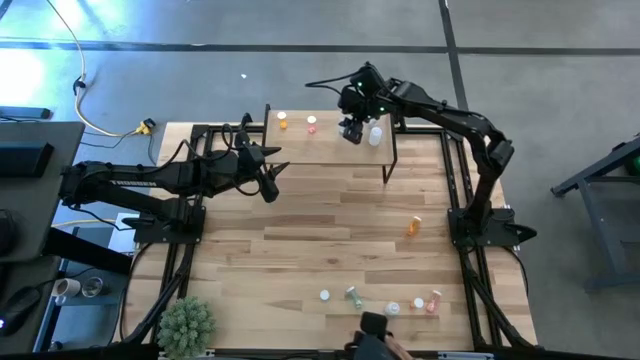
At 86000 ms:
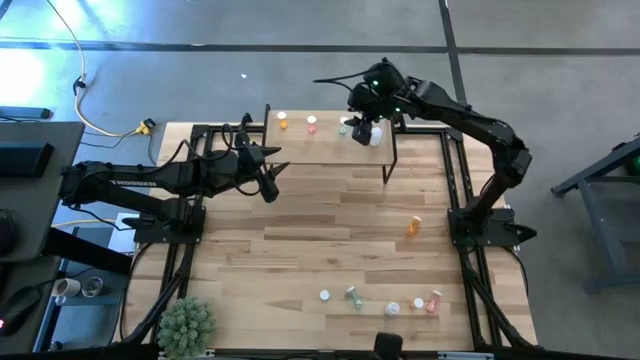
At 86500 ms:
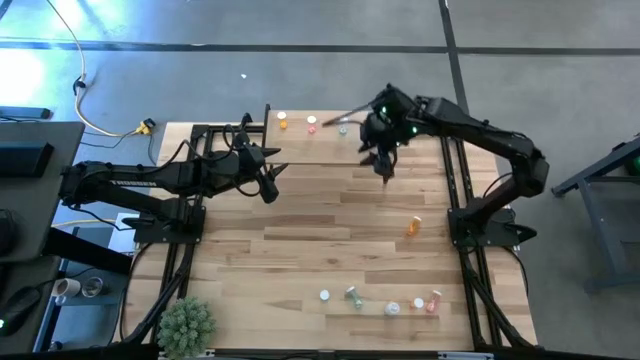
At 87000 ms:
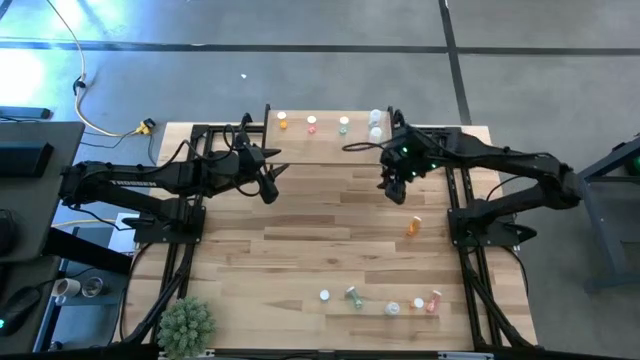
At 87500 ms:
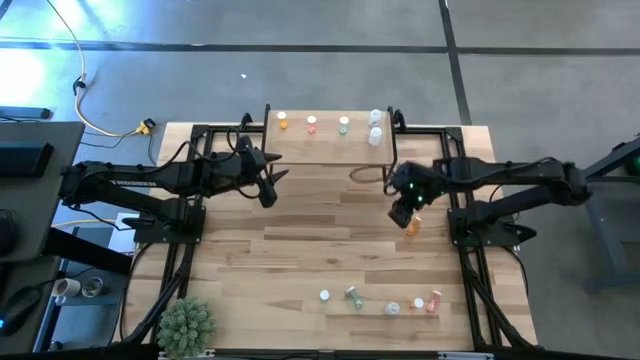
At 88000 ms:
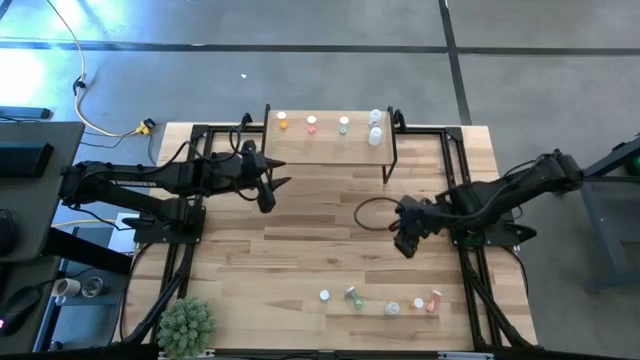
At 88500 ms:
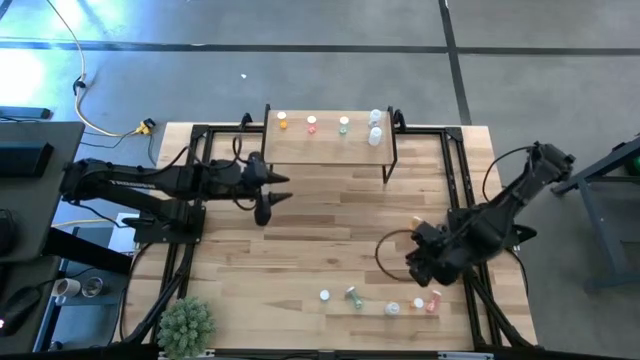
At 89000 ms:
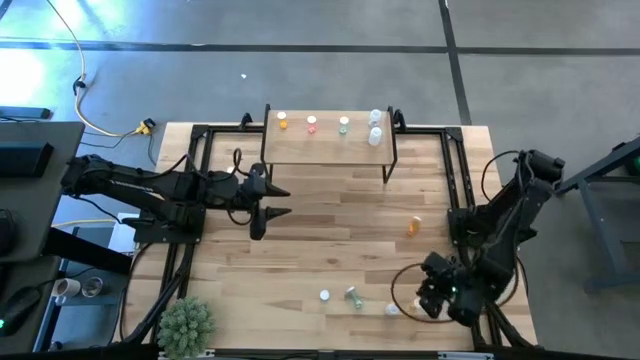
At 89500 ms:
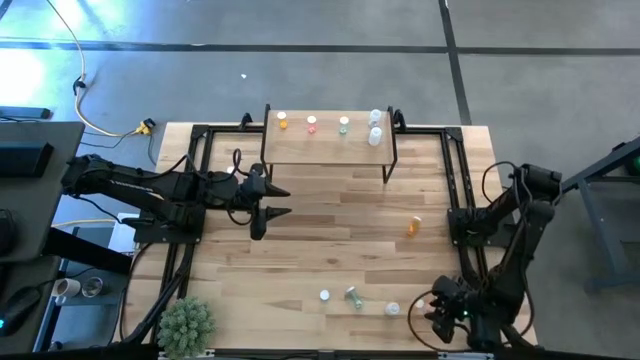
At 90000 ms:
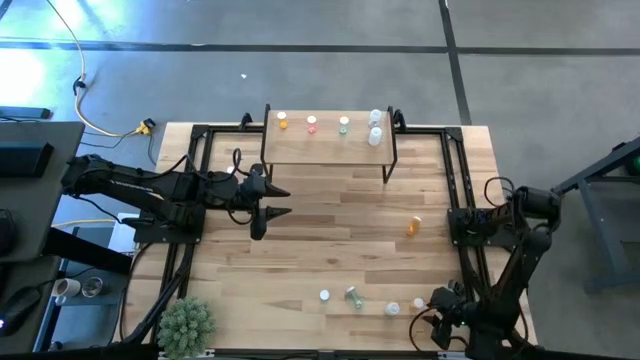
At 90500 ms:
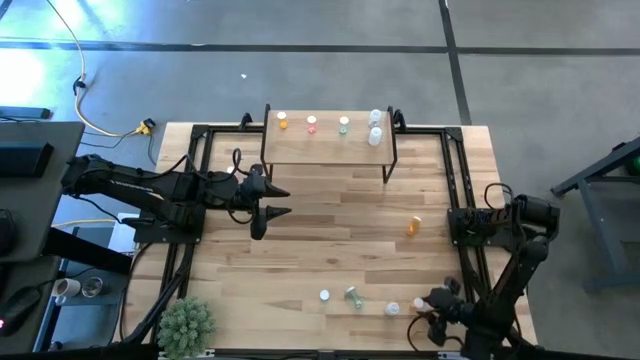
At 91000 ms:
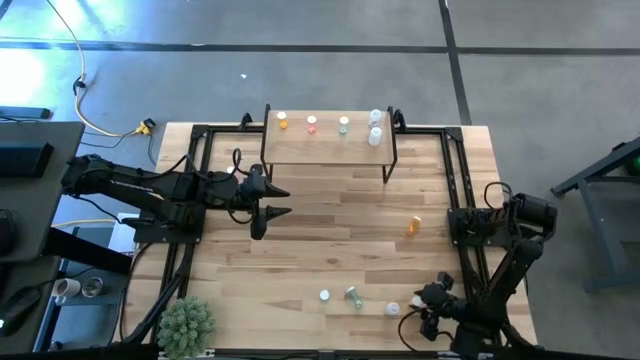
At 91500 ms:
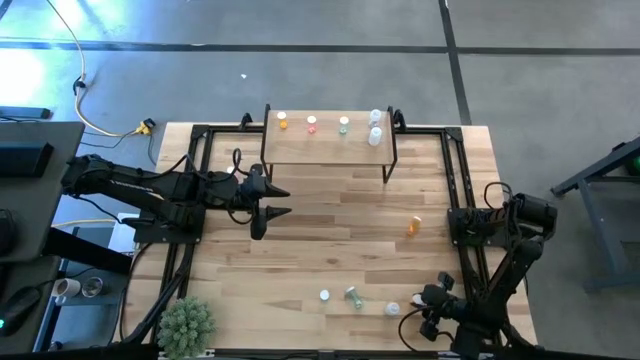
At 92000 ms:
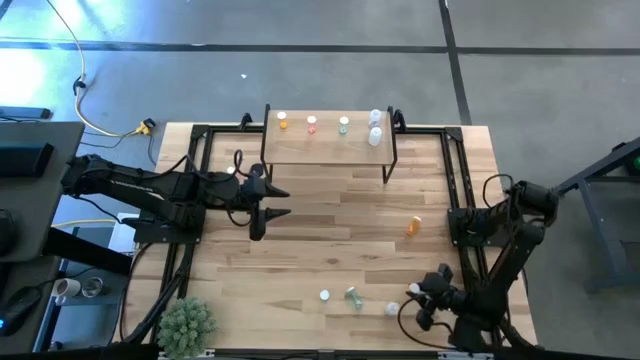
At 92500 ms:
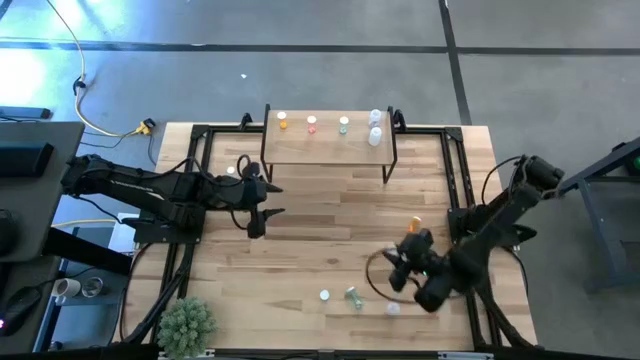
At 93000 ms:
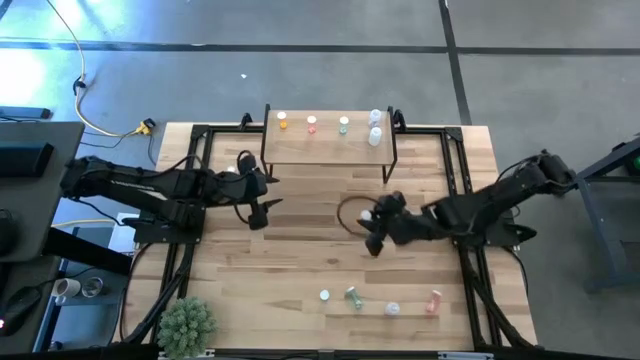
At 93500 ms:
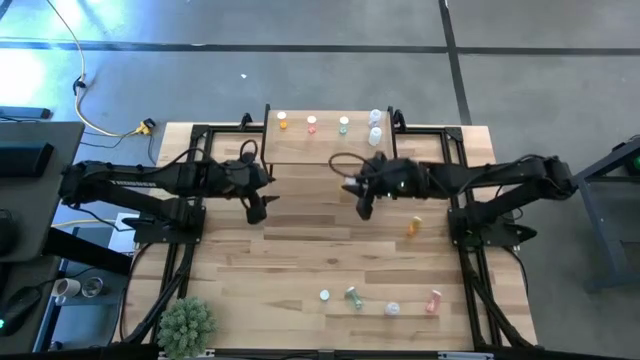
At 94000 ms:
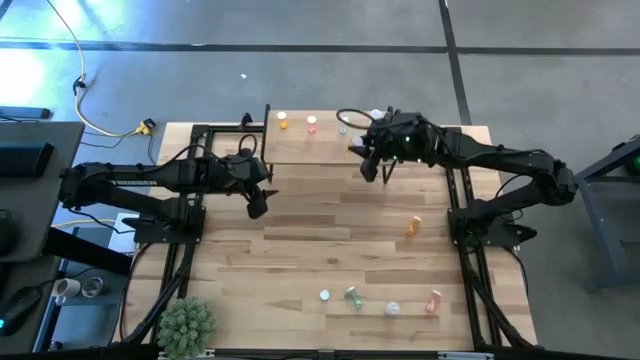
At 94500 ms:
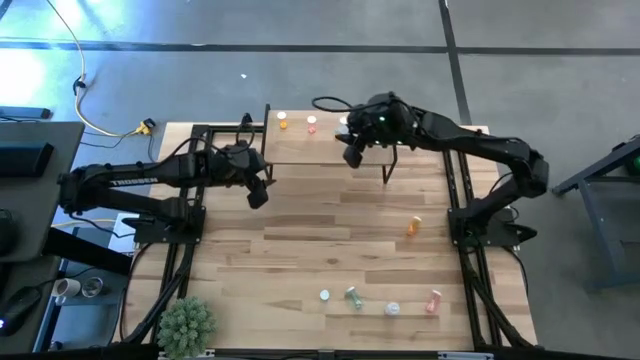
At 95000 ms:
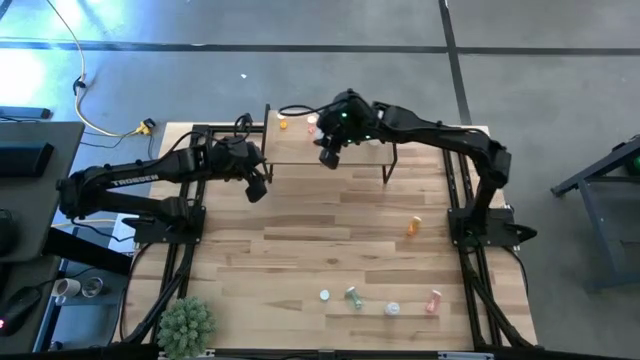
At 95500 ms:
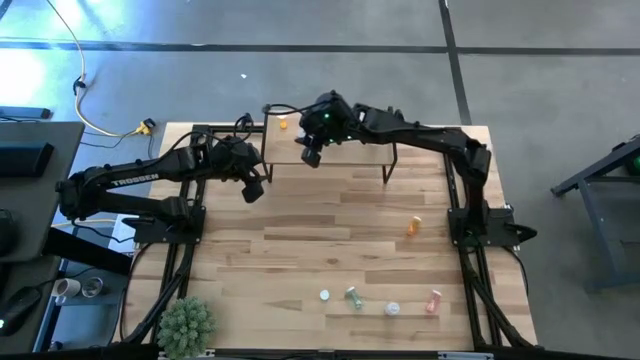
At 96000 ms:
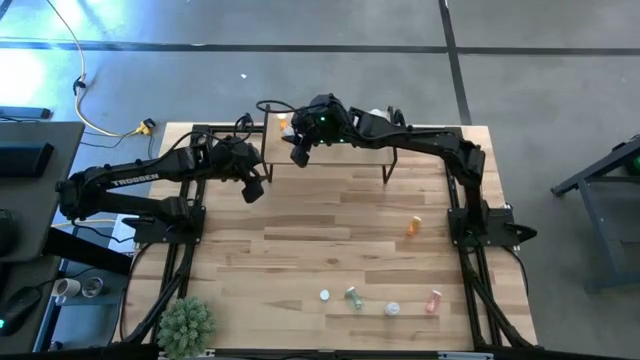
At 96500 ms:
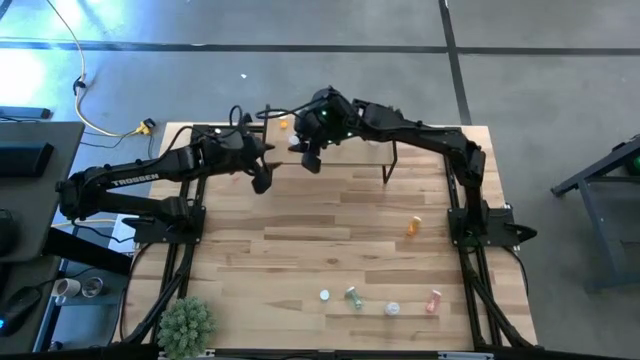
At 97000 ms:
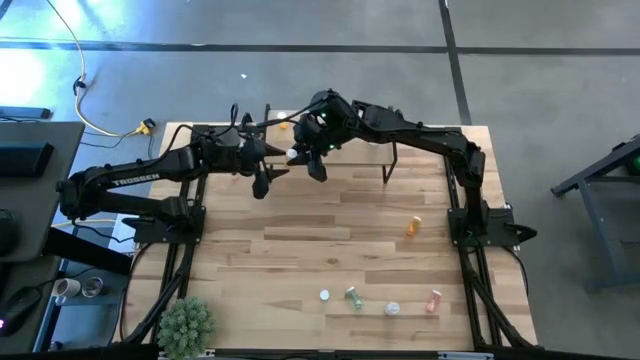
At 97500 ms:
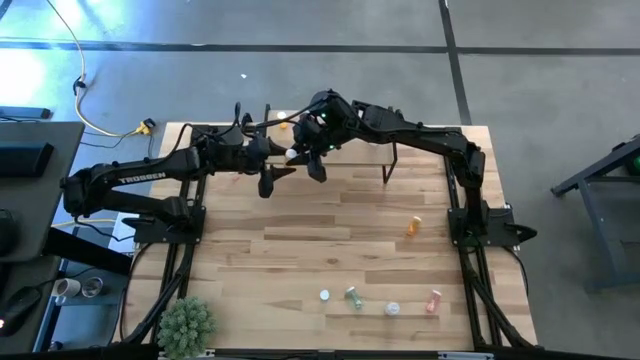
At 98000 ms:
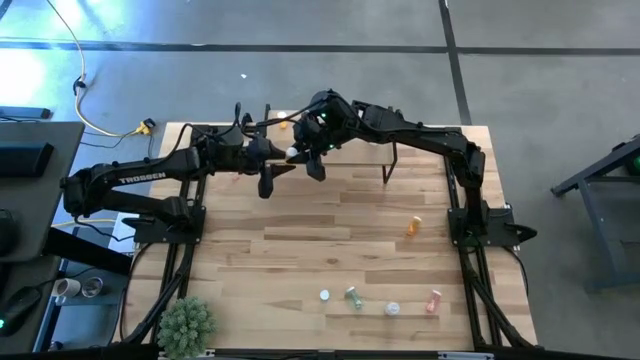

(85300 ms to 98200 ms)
Task: Pick and place medicine bottles onto shelf by color
Put the bottom orange pill bottle on the shelf aligned with the orange pill bottle

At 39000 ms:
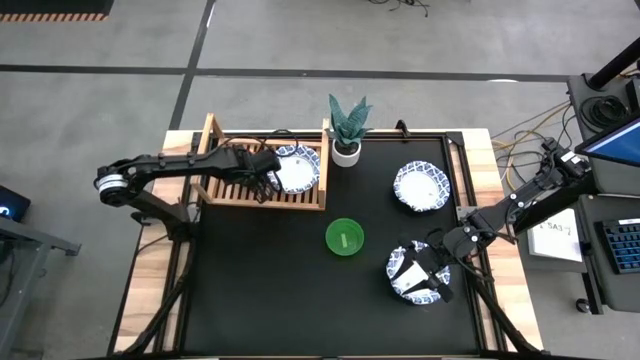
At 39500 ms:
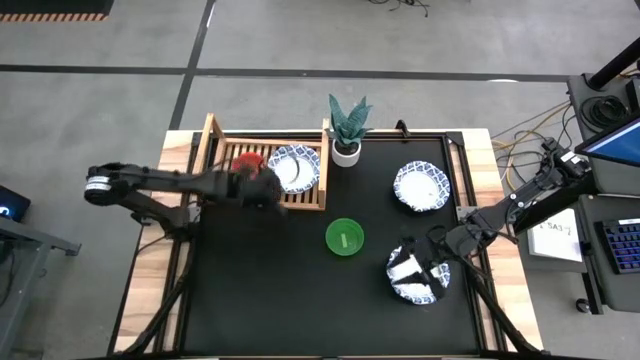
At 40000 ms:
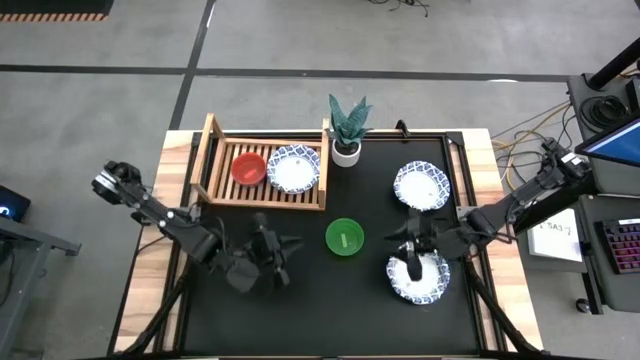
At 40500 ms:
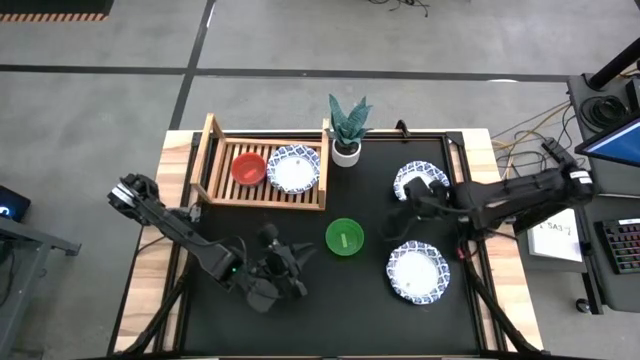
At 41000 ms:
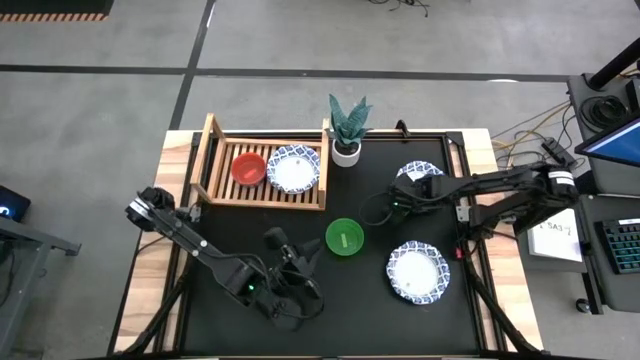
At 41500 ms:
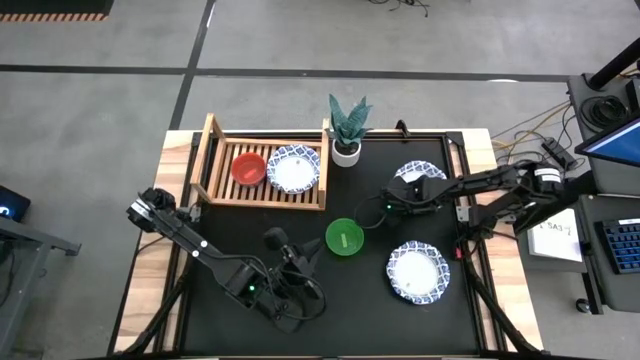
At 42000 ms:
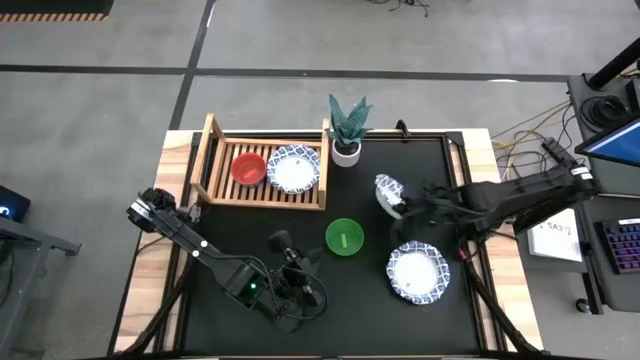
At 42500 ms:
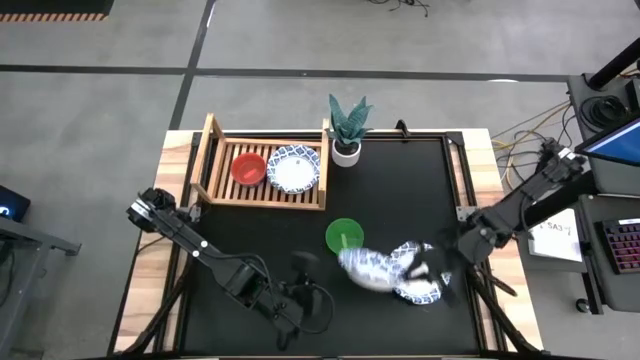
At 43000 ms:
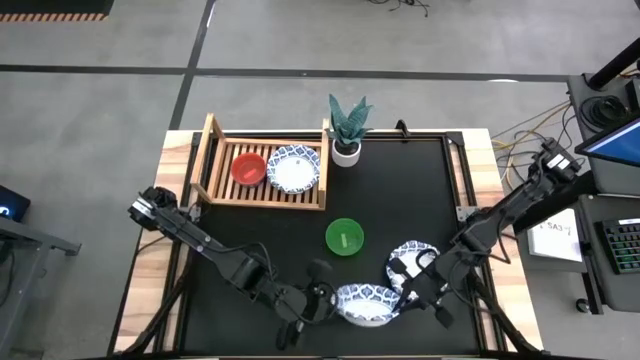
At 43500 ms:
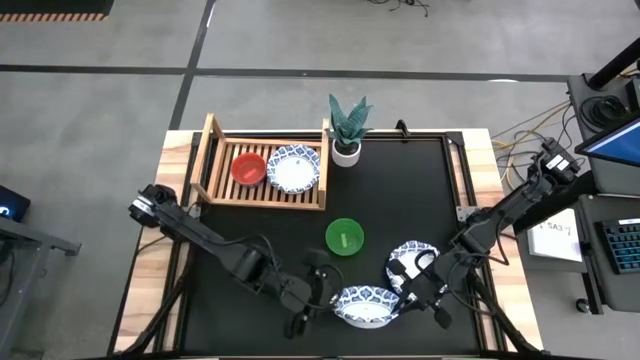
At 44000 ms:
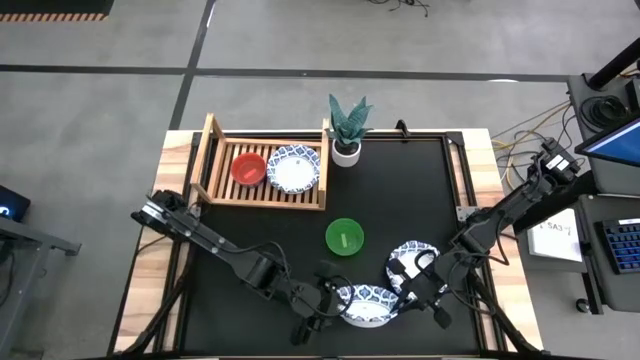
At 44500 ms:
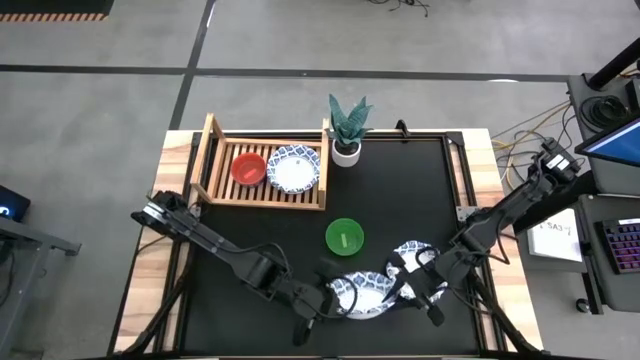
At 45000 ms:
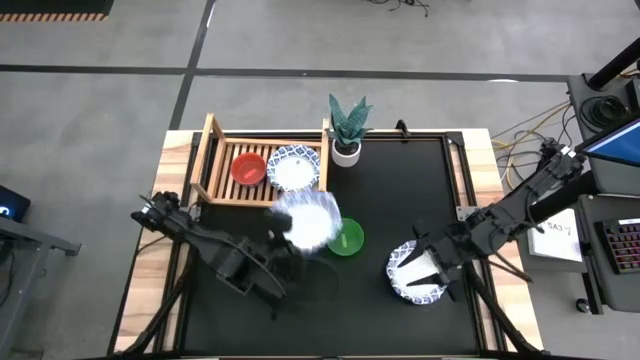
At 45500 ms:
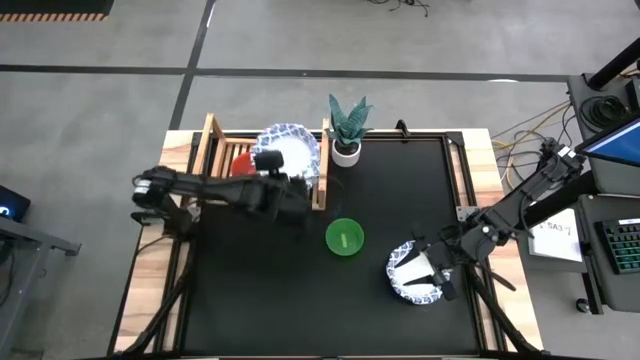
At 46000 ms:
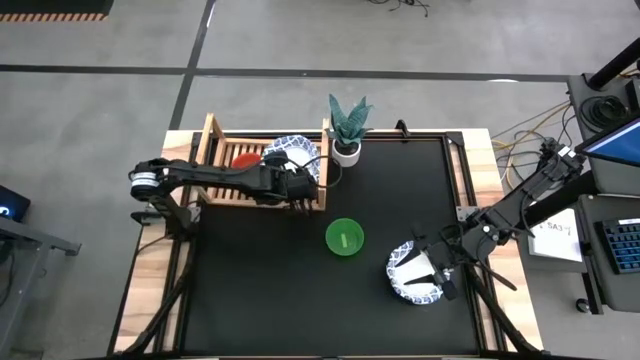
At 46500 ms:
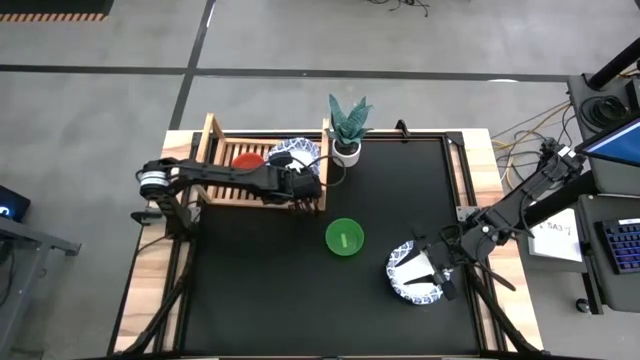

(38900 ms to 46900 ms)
Task: Place and stack bowls onto a shelf
Stack the blue patterned bowl on top of the blue patterned bowl on the shelf
